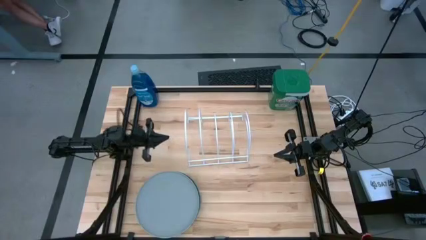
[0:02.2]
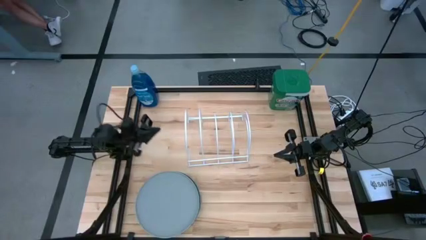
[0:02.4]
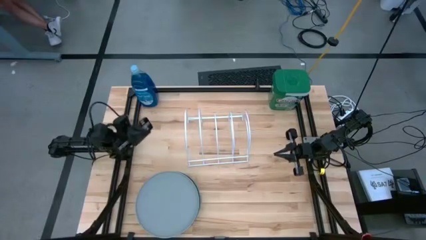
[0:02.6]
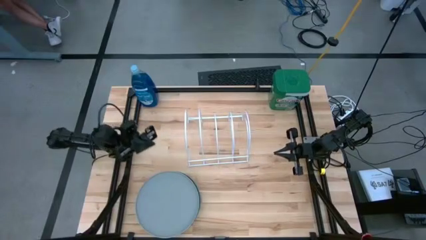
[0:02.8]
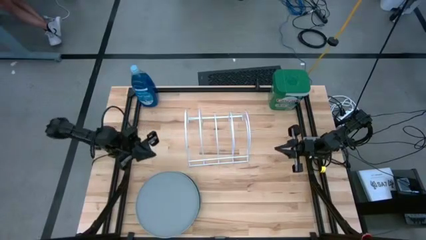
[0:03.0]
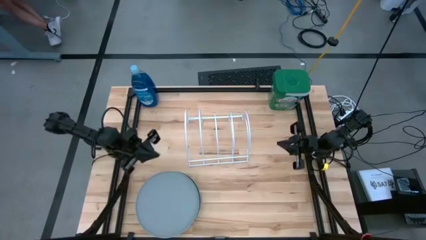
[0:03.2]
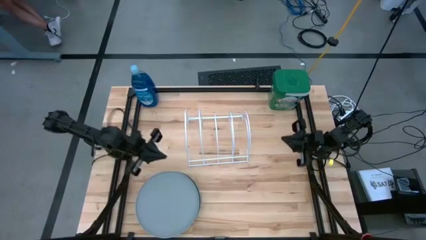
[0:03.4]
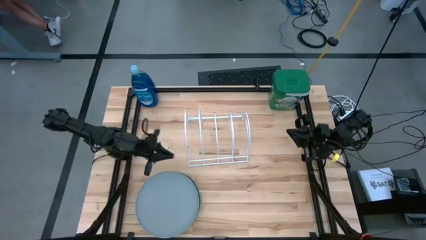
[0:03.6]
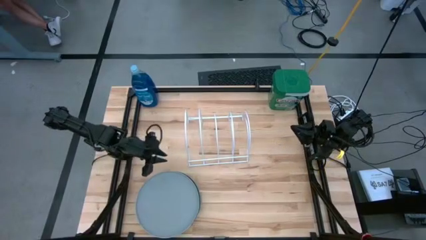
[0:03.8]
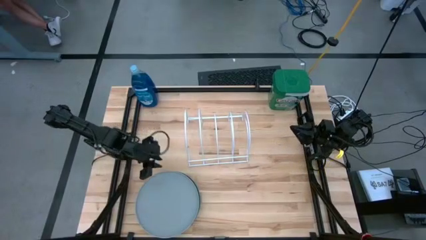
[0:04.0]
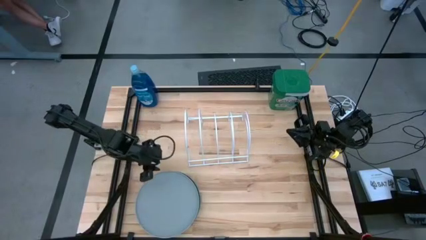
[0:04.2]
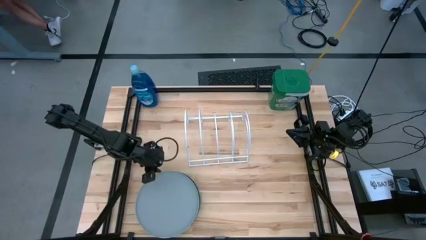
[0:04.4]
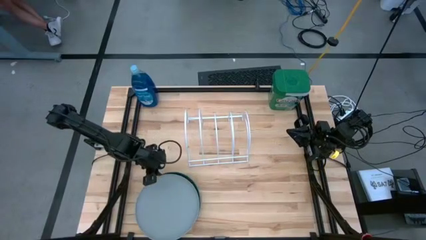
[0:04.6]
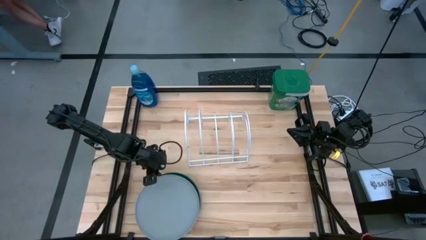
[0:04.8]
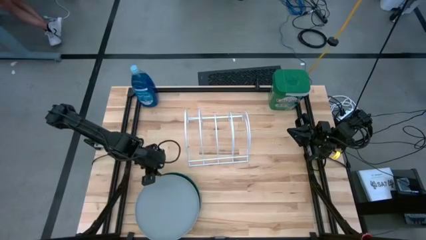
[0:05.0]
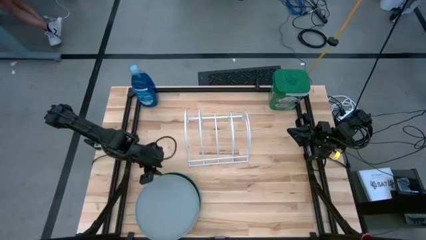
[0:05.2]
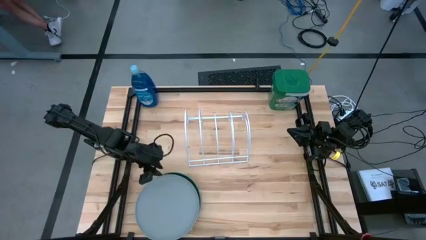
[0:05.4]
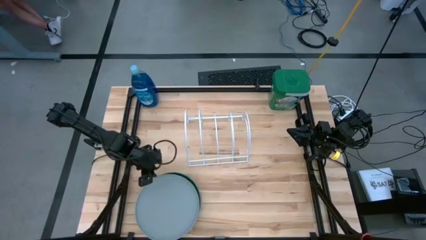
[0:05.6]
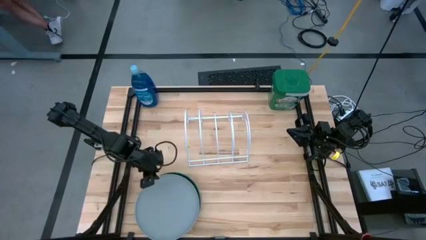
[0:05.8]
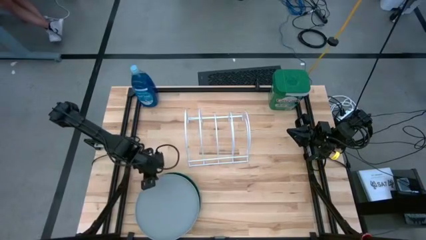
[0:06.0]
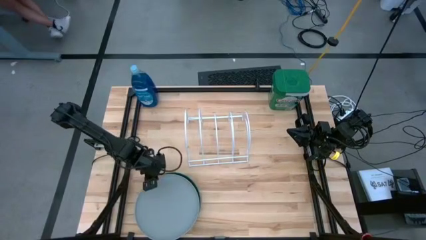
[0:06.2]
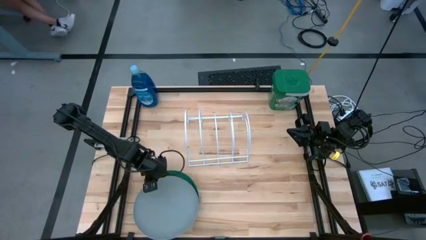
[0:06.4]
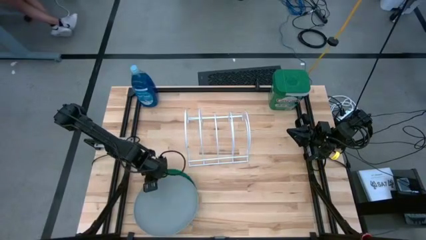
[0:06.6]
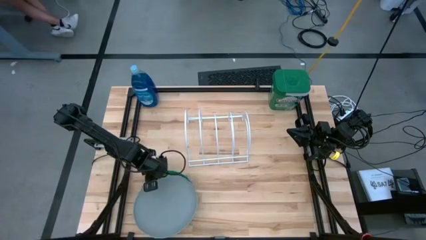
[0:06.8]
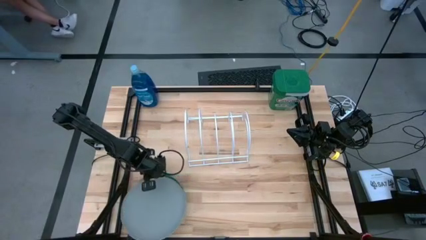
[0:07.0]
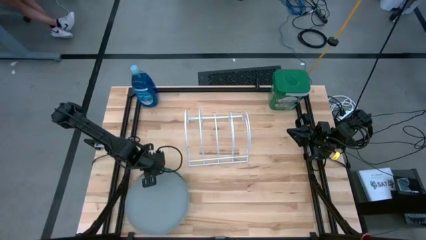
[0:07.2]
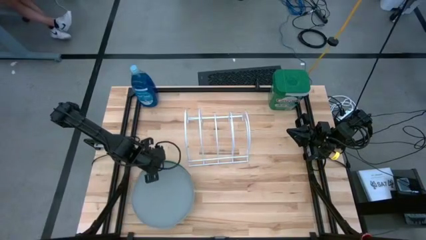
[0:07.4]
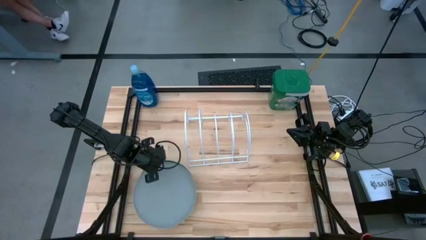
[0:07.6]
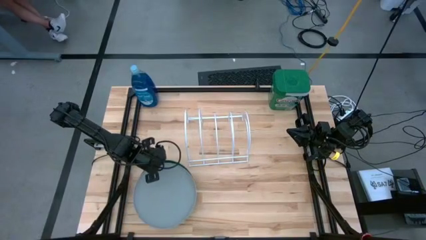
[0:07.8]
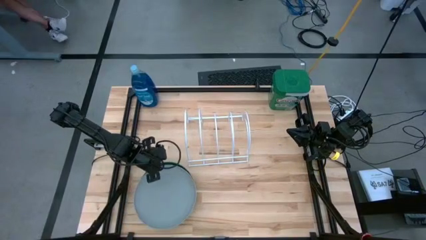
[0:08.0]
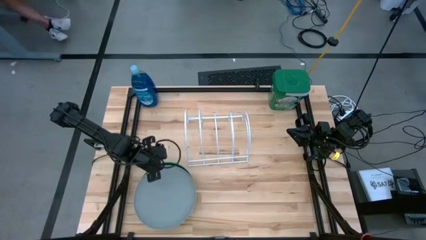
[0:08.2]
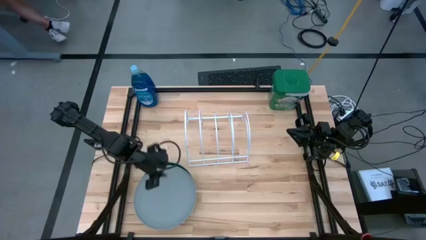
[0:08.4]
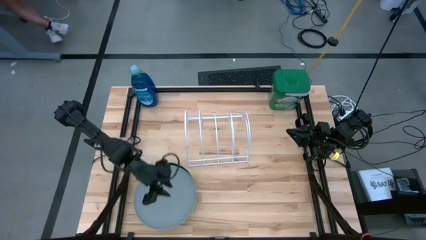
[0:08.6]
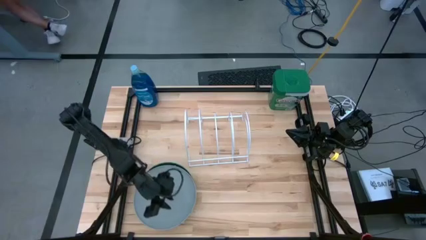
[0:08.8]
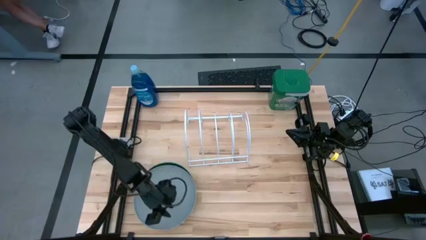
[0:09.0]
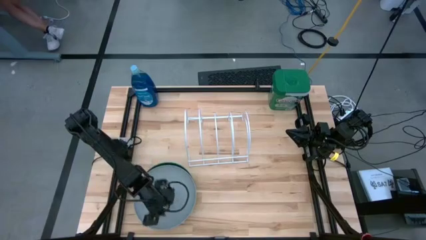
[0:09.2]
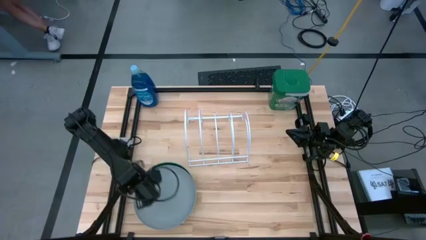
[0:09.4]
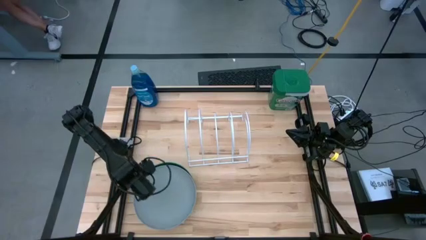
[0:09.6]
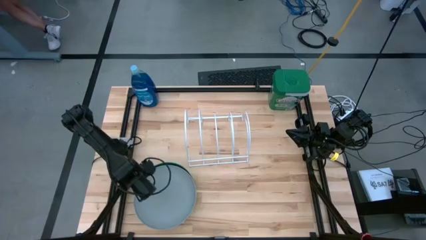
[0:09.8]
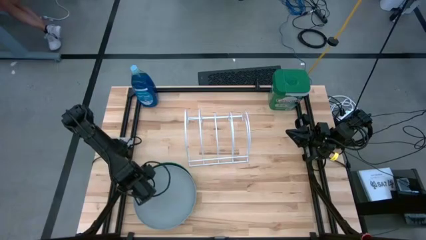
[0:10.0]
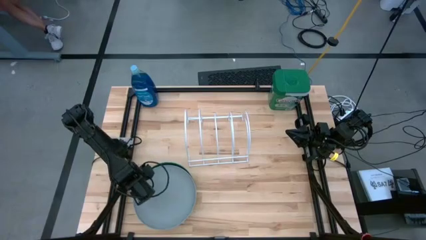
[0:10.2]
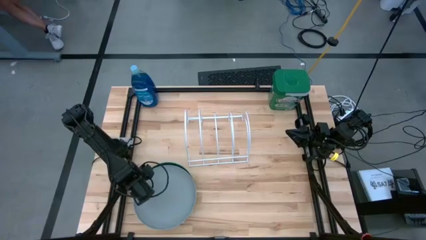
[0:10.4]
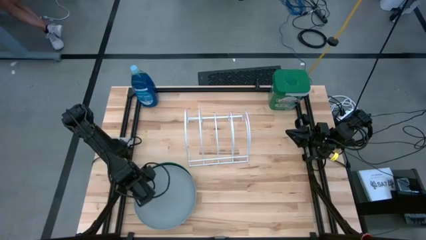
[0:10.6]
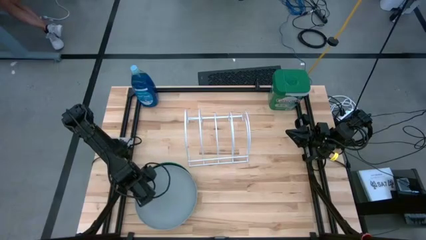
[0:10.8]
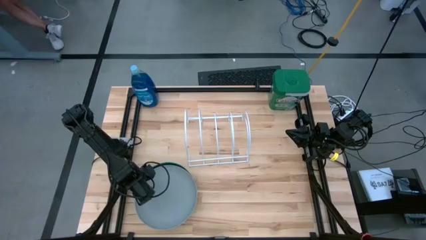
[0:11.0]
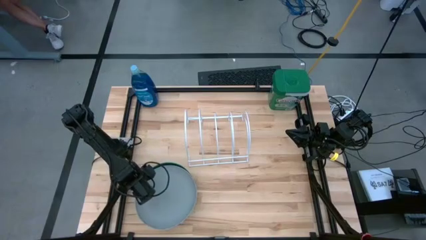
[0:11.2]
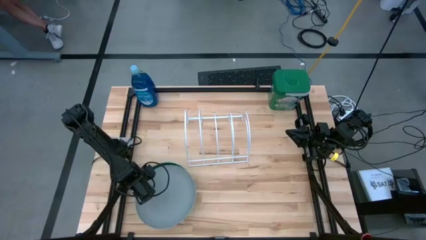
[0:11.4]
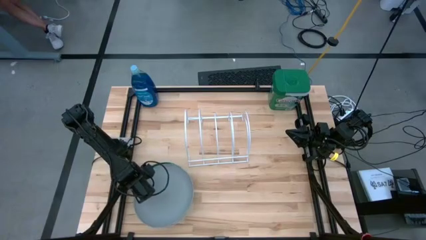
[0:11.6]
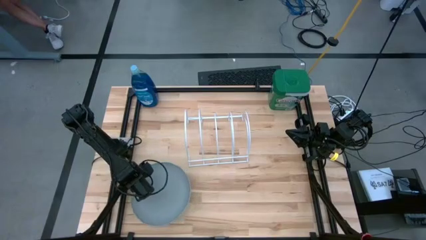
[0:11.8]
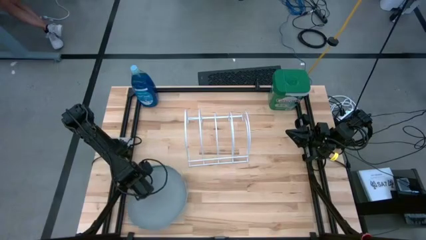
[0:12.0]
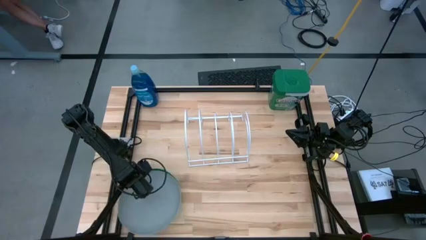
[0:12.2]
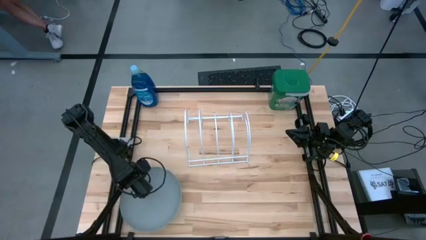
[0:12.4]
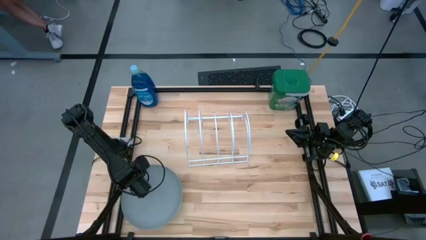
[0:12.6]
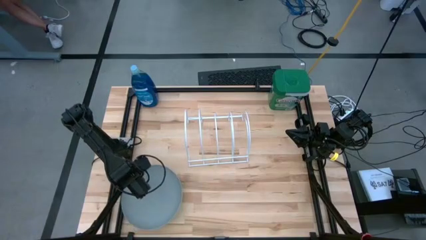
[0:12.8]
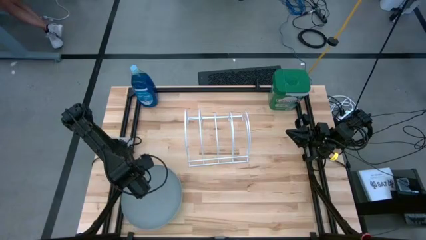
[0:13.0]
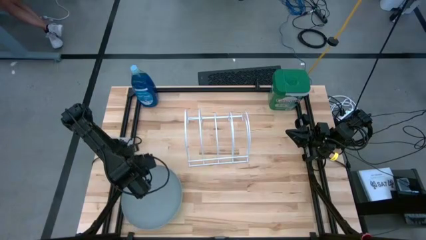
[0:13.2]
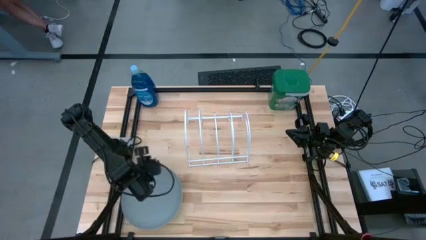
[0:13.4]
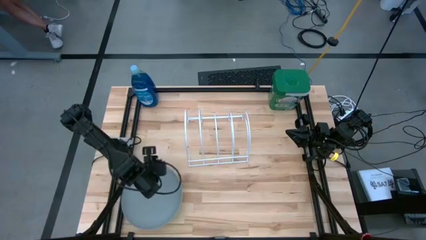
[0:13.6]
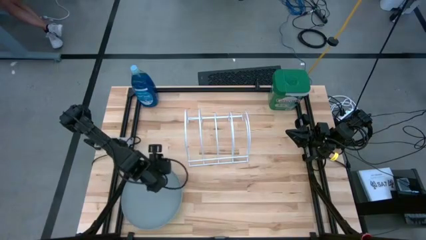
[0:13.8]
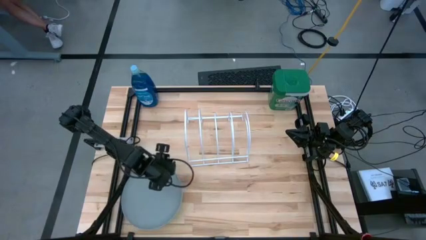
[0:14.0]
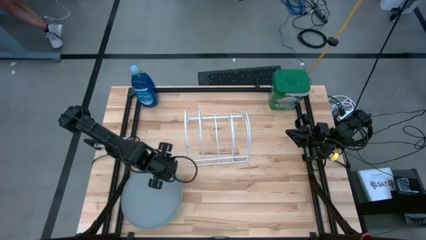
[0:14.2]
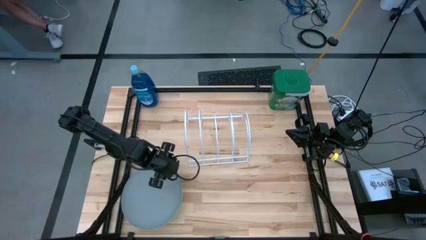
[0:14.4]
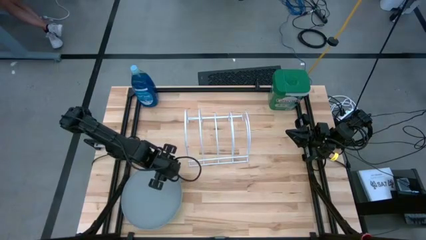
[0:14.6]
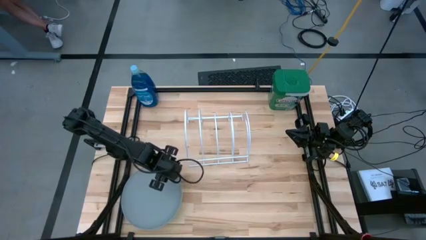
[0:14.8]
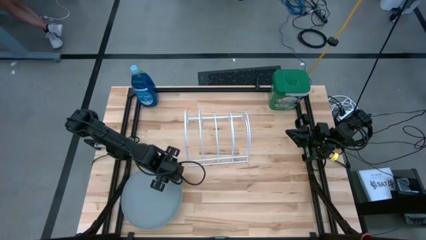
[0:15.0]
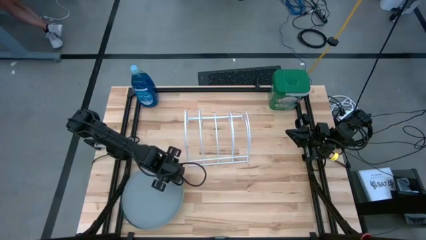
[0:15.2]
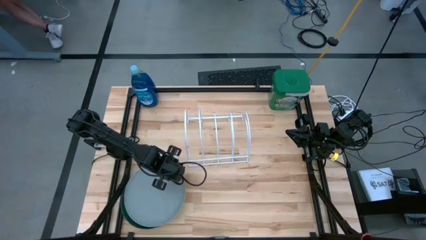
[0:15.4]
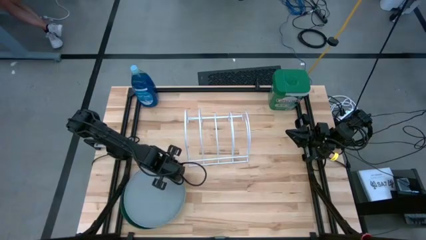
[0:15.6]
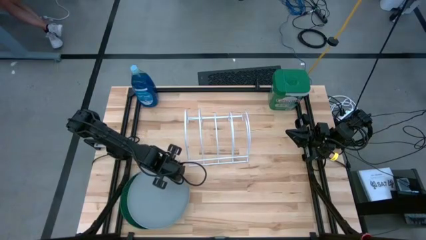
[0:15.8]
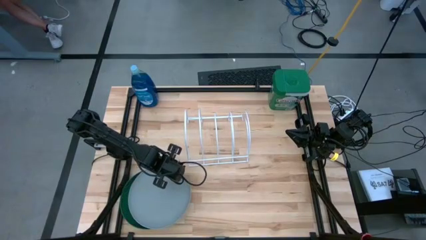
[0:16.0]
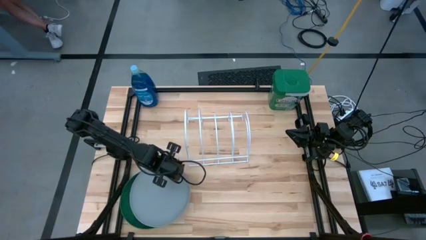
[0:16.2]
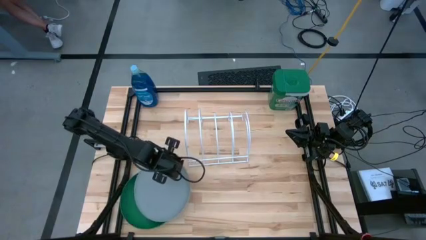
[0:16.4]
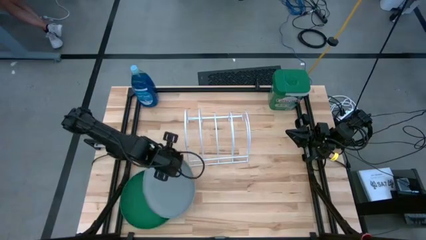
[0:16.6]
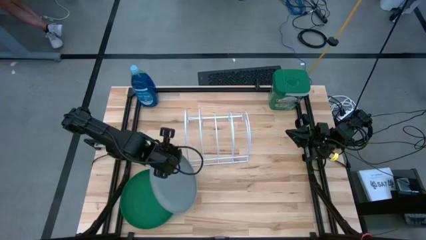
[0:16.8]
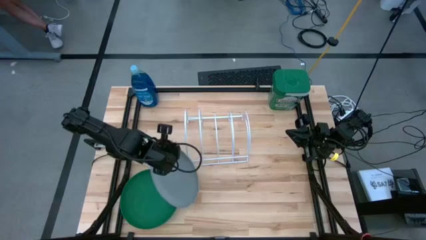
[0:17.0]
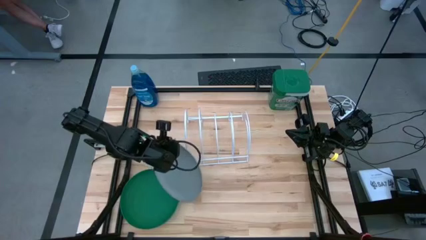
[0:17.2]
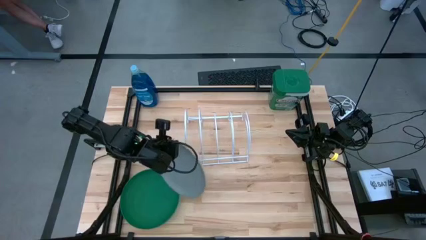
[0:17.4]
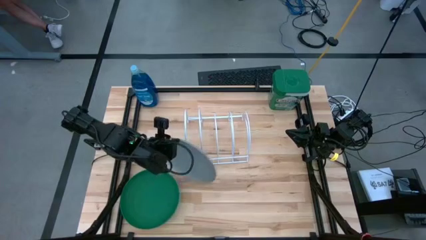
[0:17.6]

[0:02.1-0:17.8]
Task: Sort dishes
Put the gray plate into the dish rack
